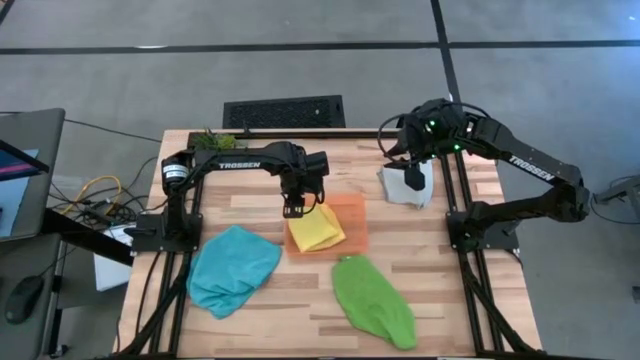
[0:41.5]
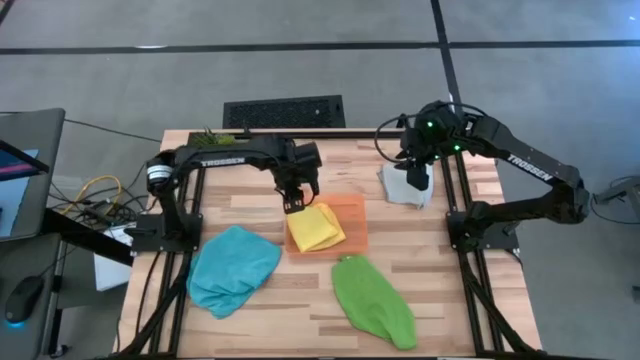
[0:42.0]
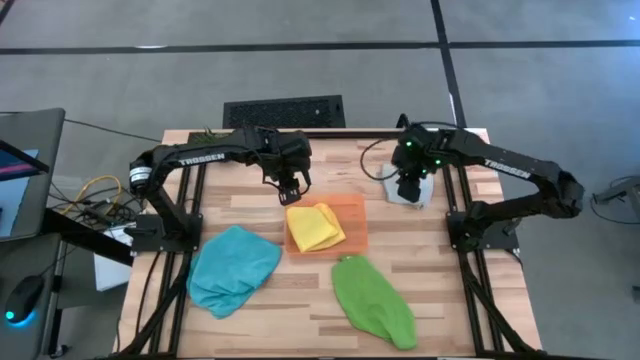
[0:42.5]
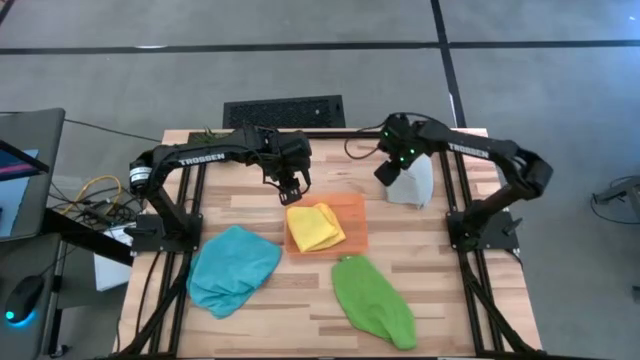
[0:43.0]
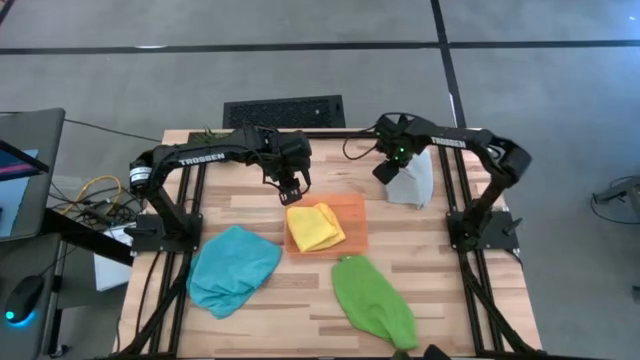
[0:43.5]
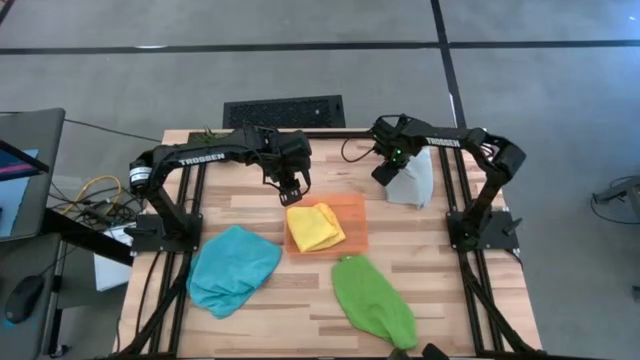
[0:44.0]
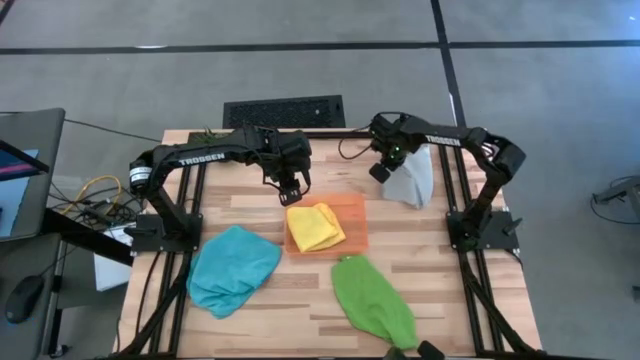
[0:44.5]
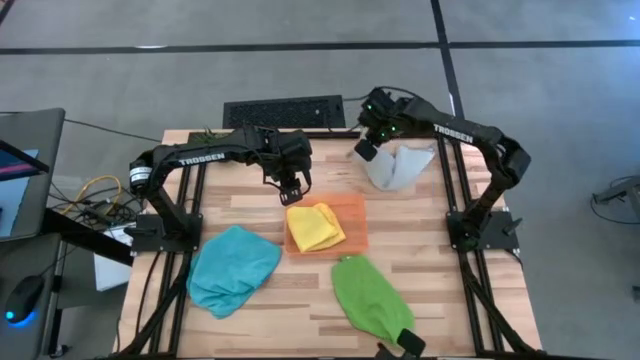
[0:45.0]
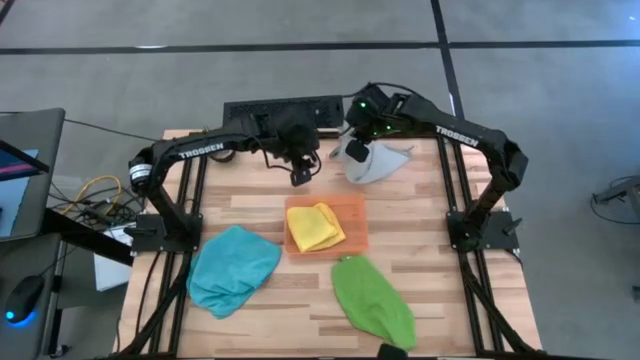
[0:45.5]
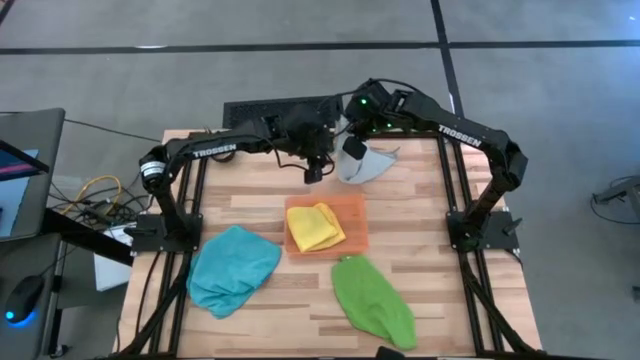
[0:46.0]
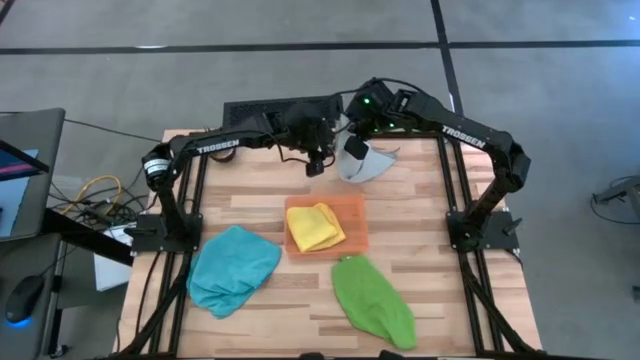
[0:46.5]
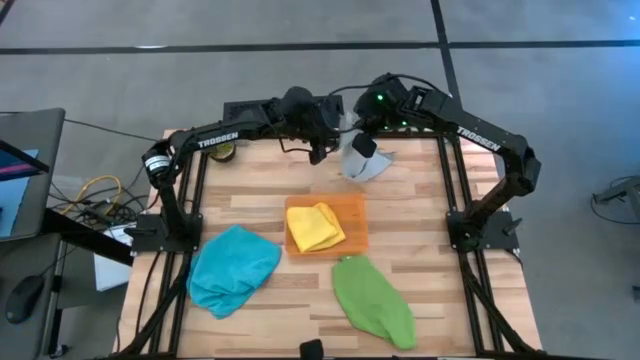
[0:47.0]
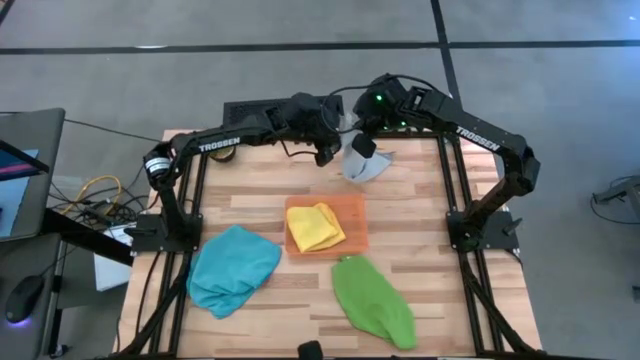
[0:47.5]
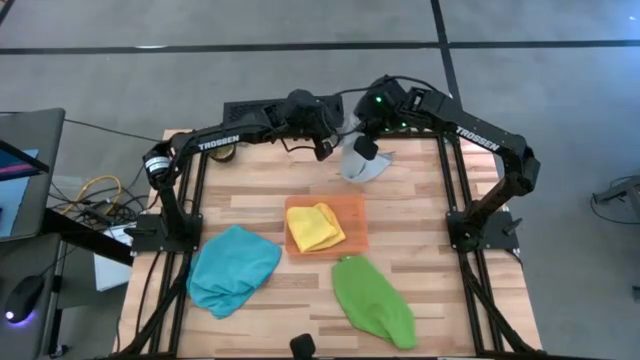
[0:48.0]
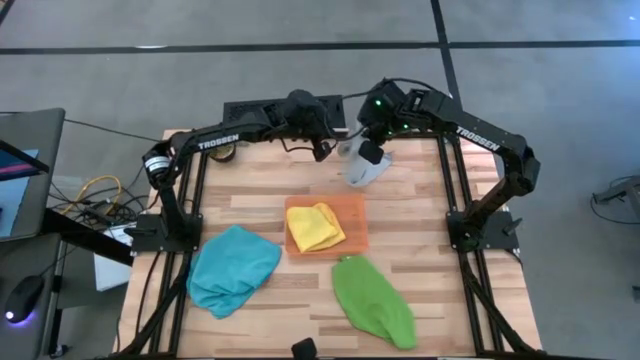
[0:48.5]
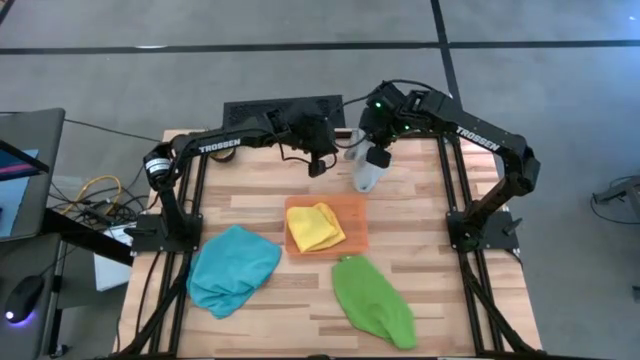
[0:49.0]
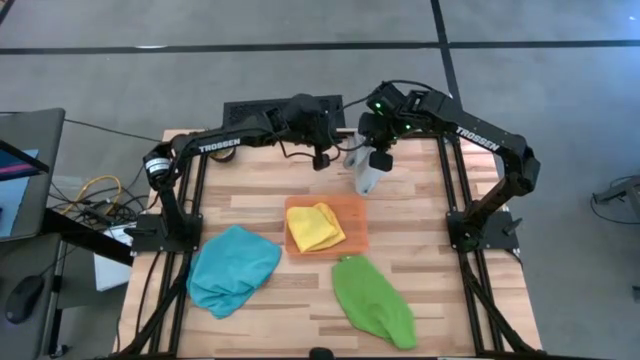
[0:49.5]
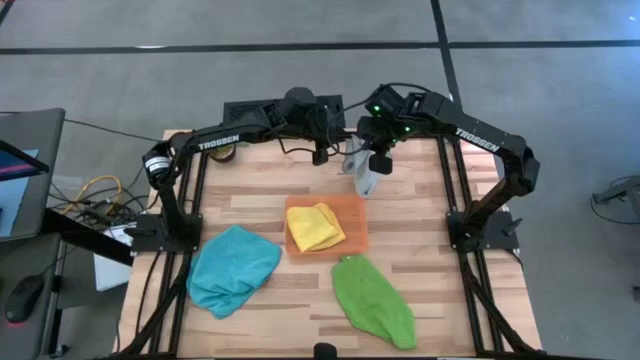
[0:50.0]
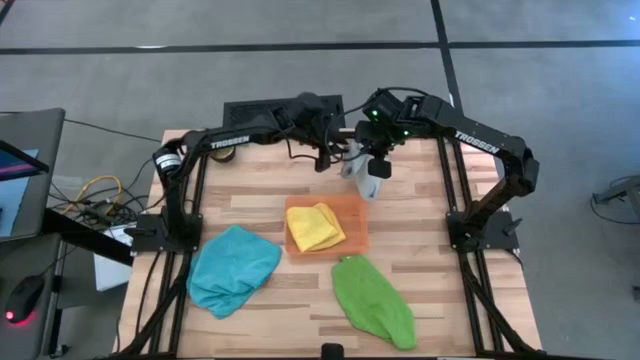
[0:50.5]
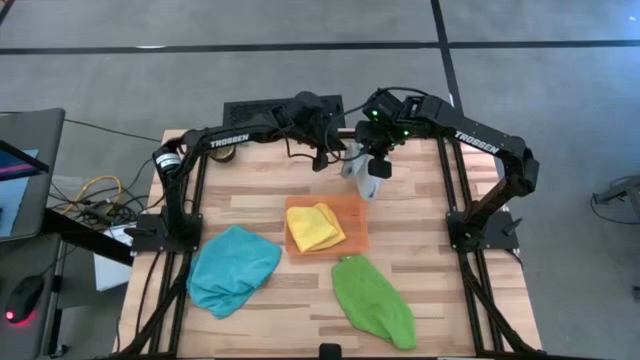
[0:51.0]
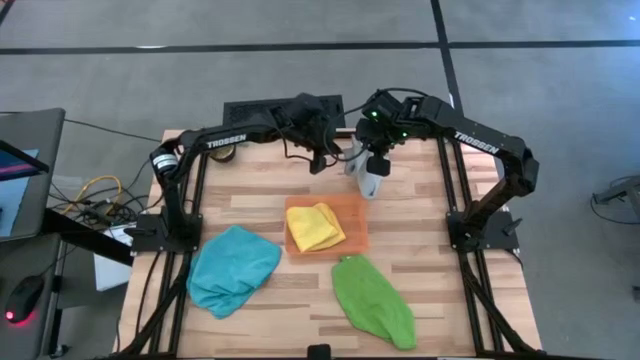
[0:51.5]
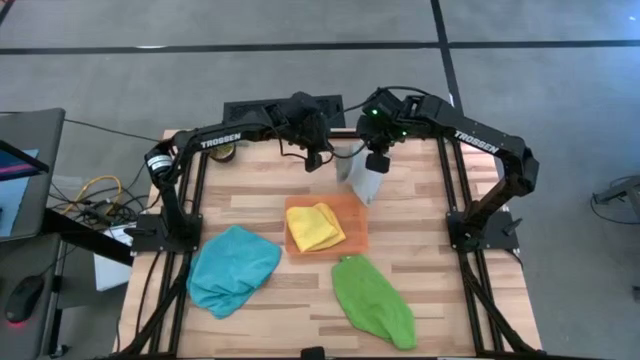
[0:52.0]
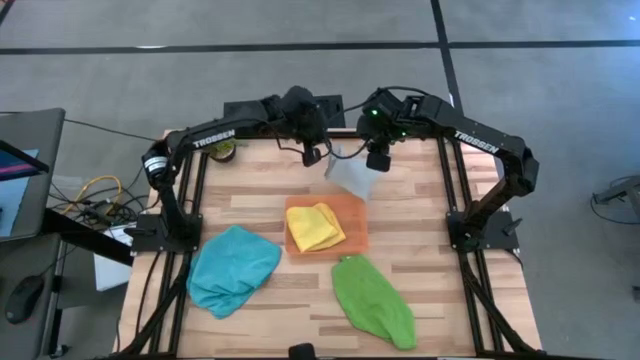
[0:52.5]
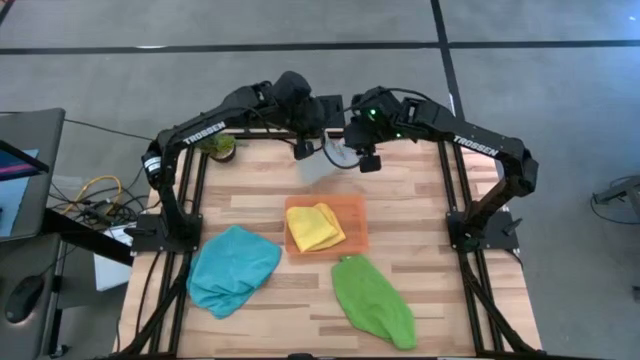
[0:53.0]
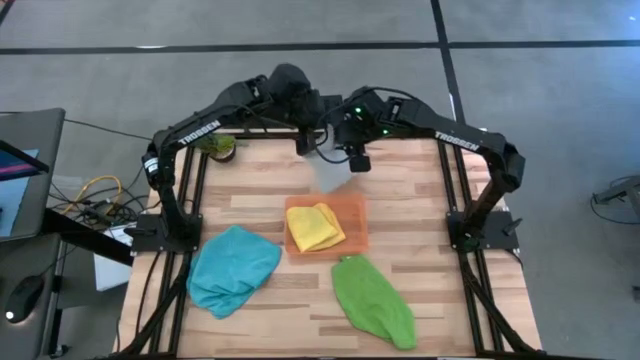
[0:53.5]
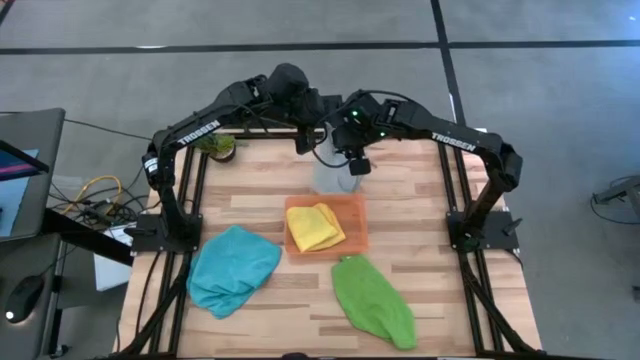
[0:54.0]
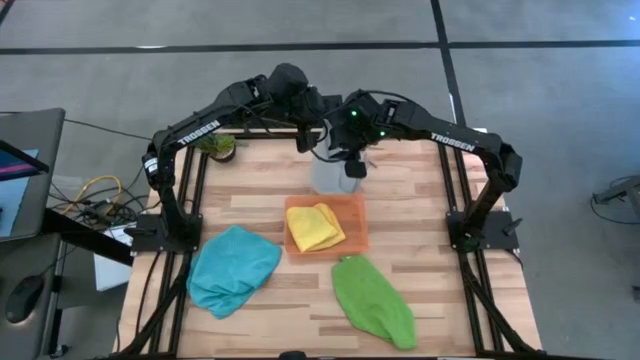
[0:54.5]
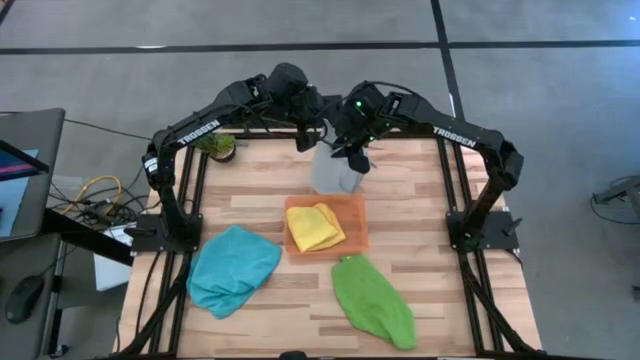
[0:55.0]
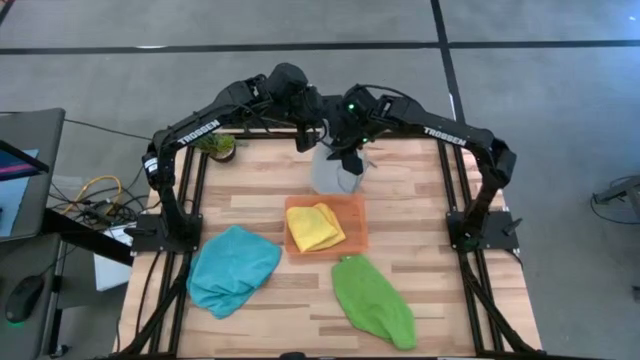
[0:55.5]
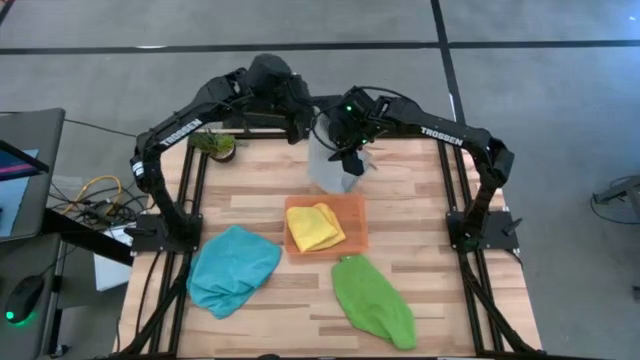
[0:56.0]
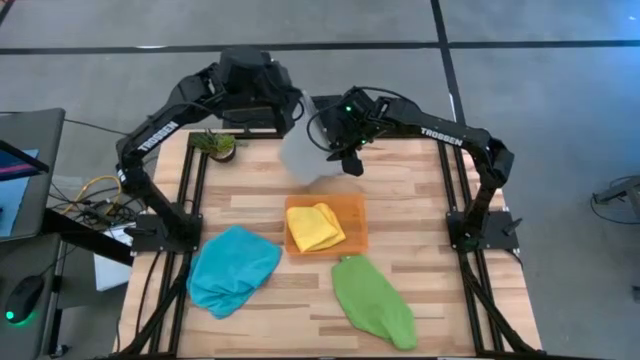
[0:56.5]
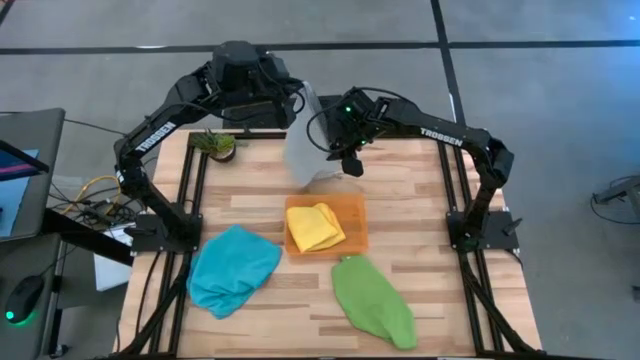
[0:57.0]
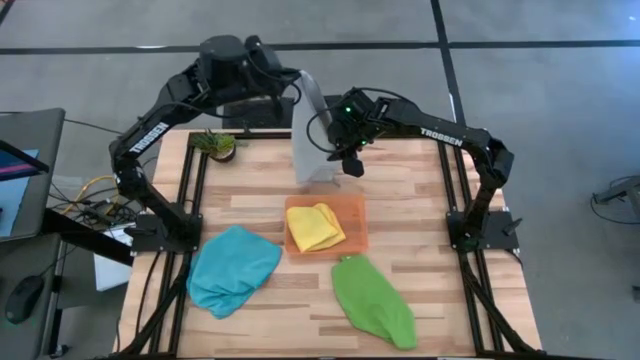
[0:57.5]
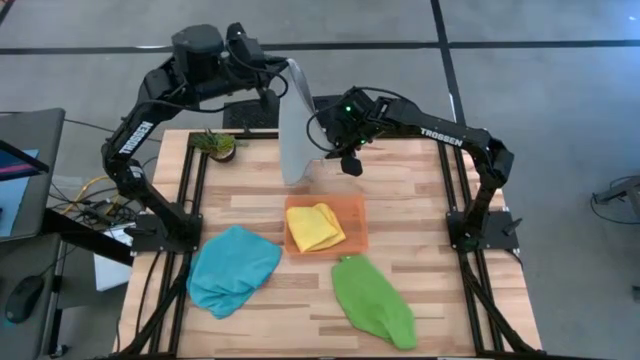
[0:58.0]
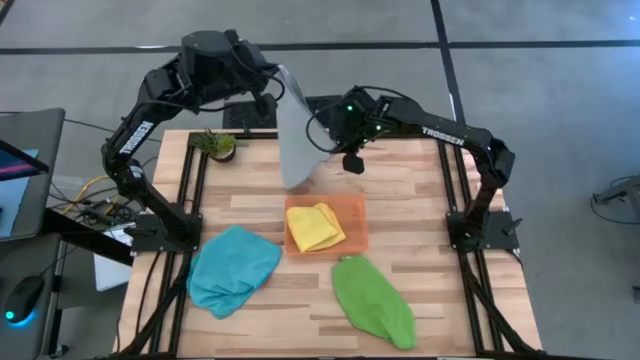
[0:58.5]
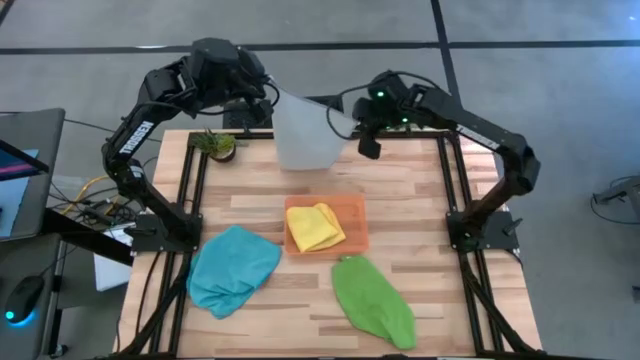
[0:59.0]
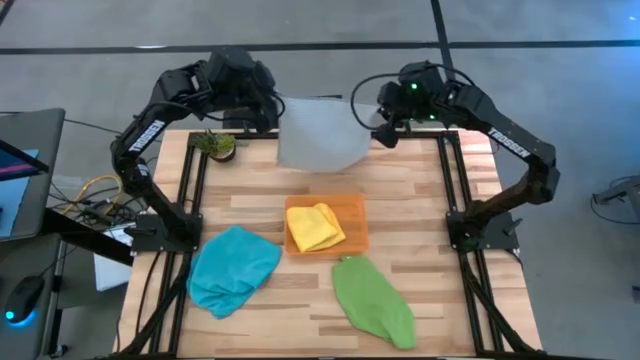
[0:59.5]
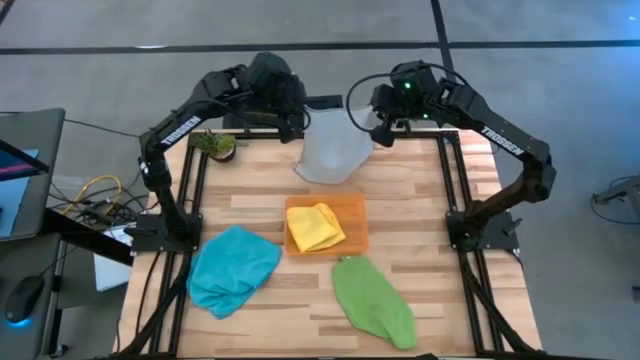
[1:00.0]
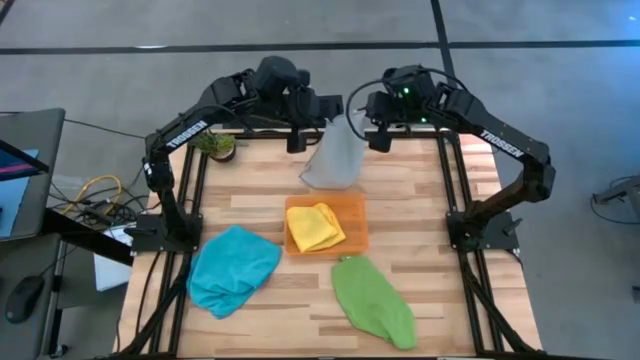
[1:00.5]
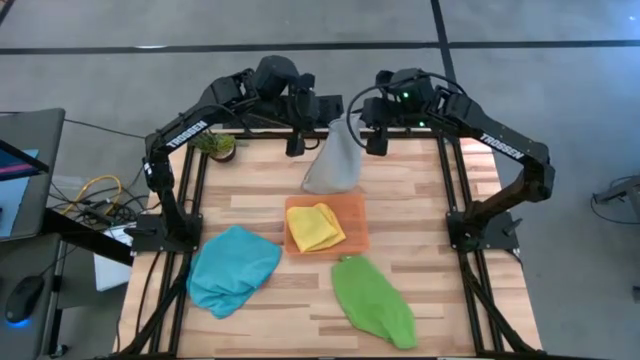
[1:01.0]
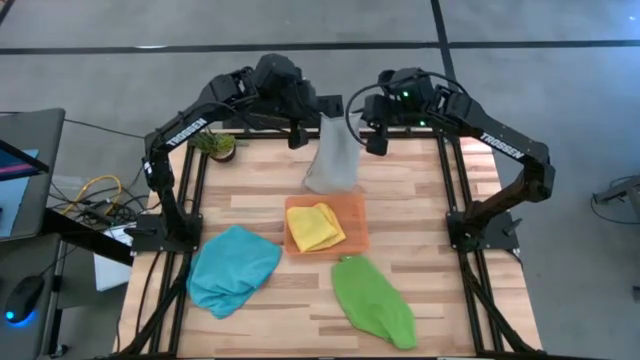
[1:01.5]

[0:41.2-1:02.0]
Task: Sort microfiber towel by color & place in baskets
Fold the gray towel
